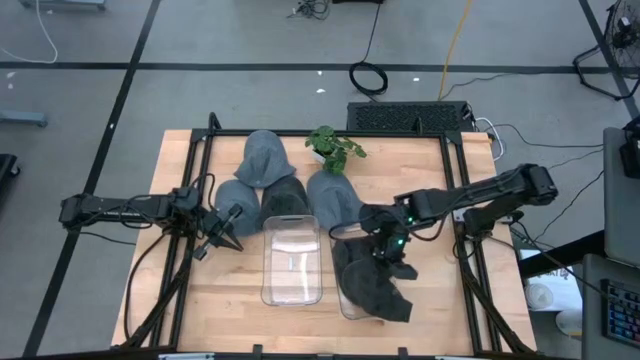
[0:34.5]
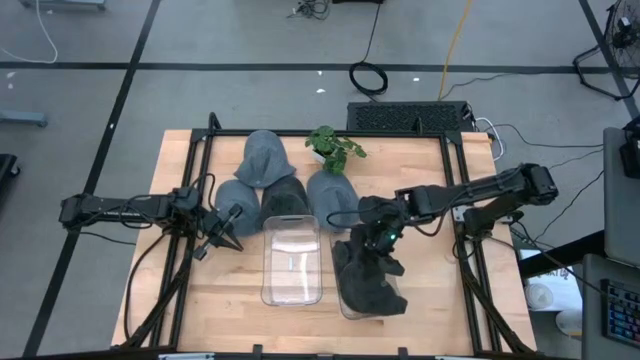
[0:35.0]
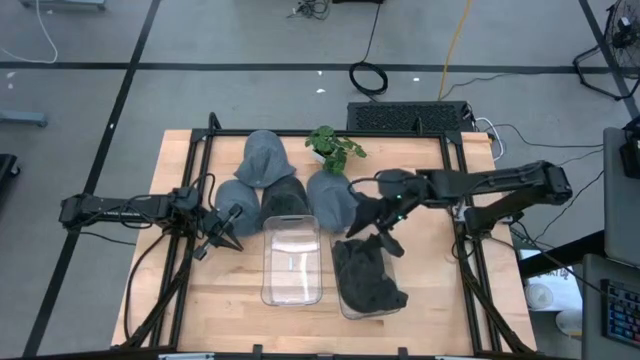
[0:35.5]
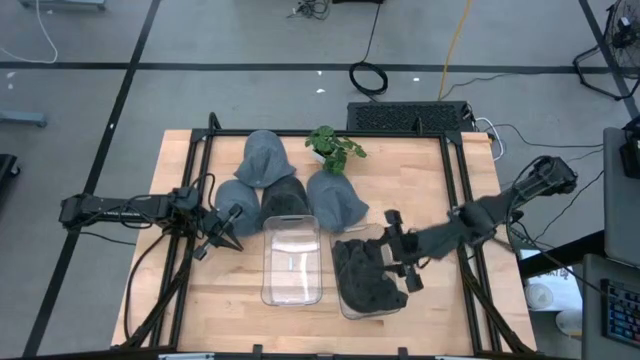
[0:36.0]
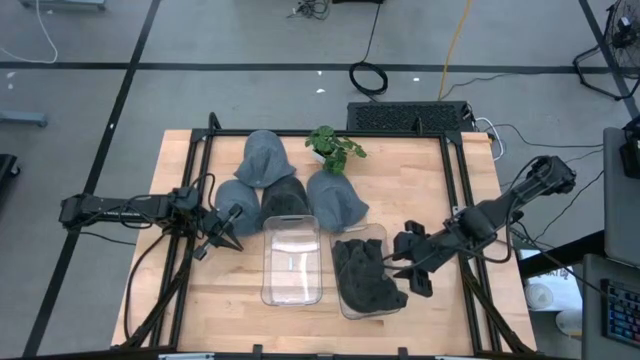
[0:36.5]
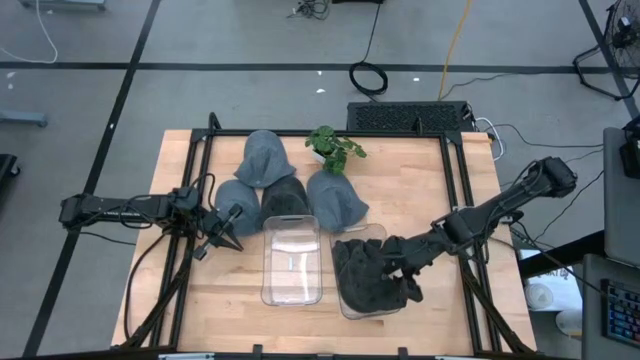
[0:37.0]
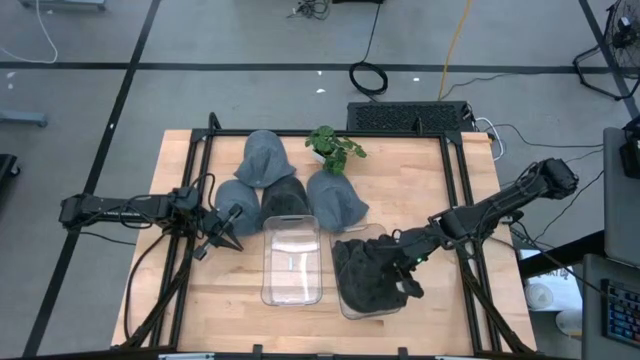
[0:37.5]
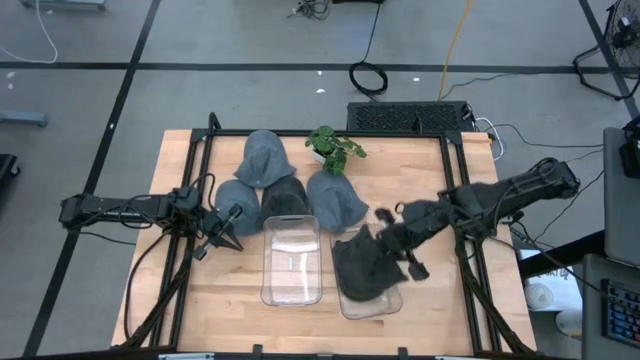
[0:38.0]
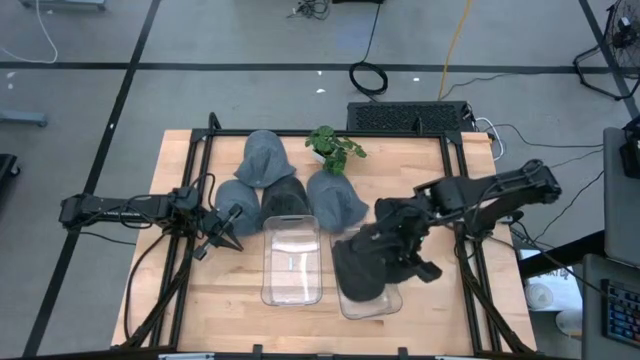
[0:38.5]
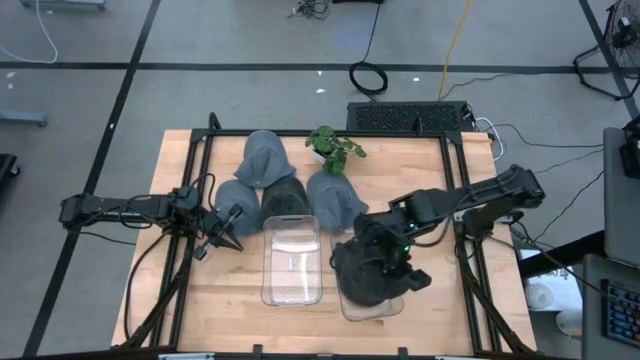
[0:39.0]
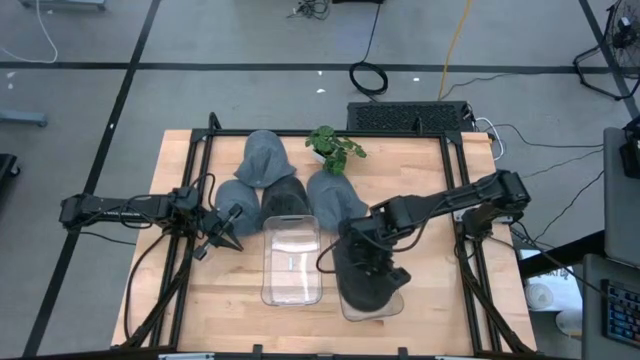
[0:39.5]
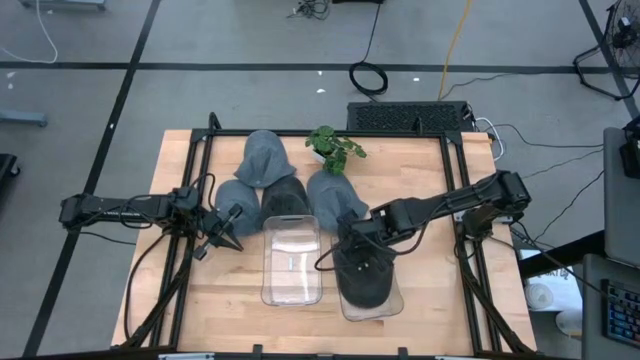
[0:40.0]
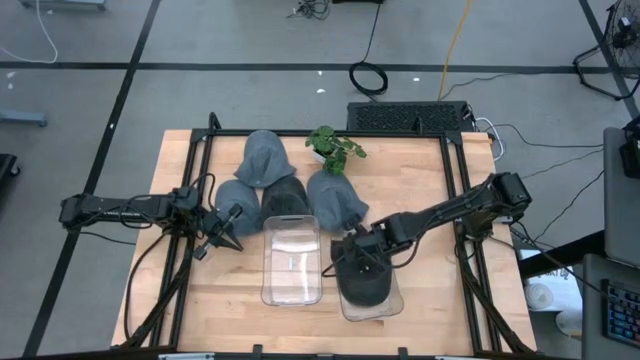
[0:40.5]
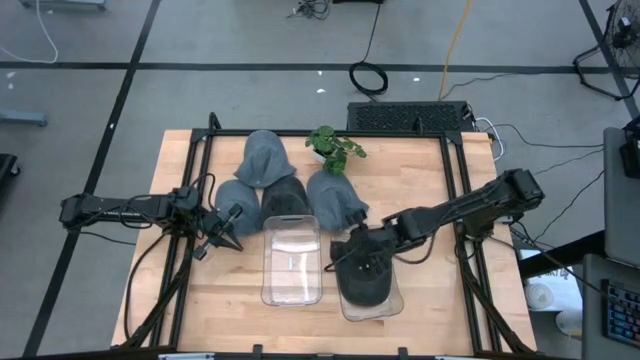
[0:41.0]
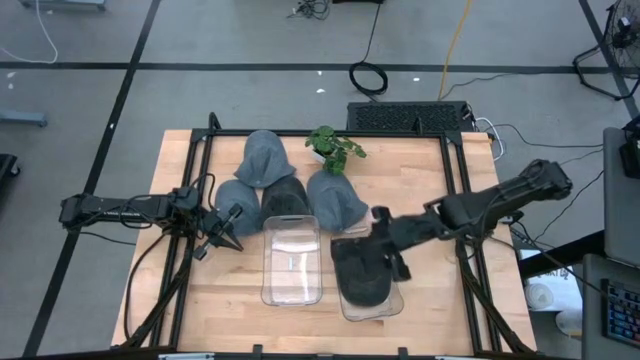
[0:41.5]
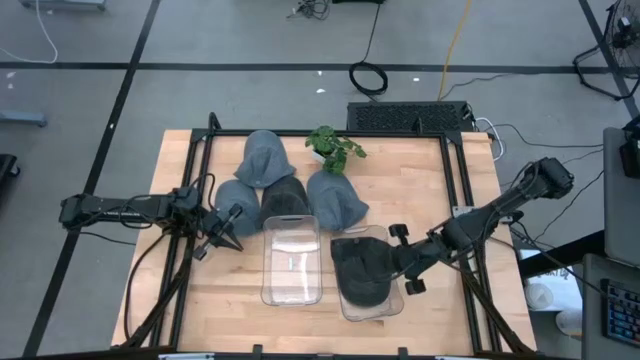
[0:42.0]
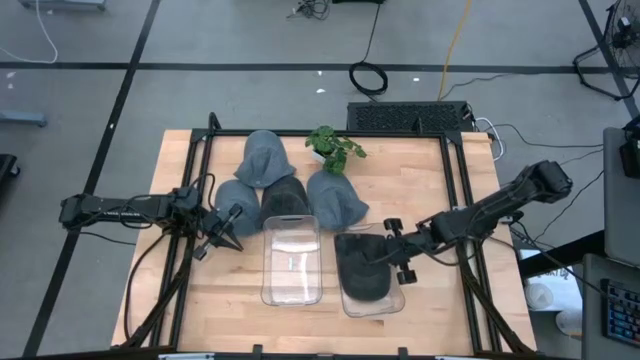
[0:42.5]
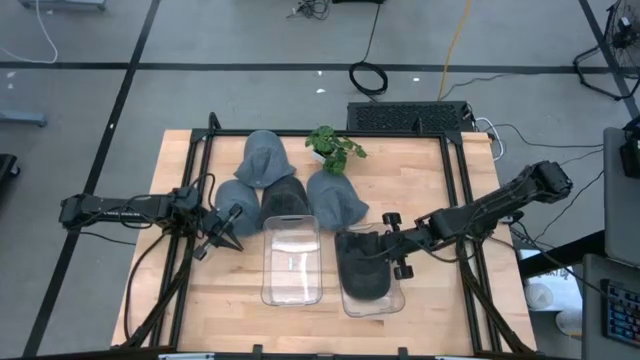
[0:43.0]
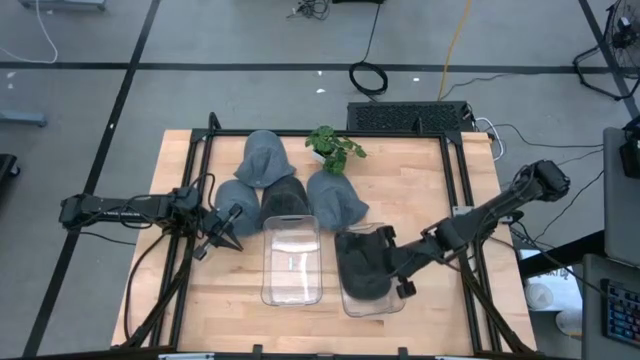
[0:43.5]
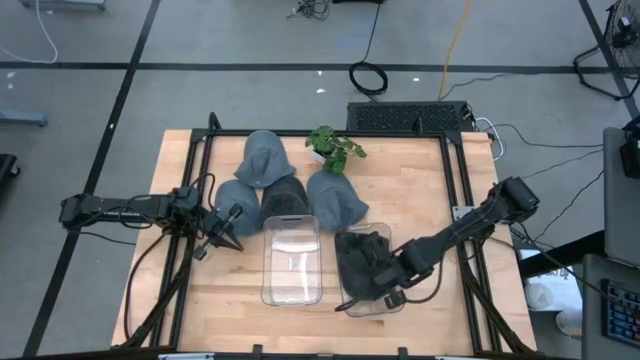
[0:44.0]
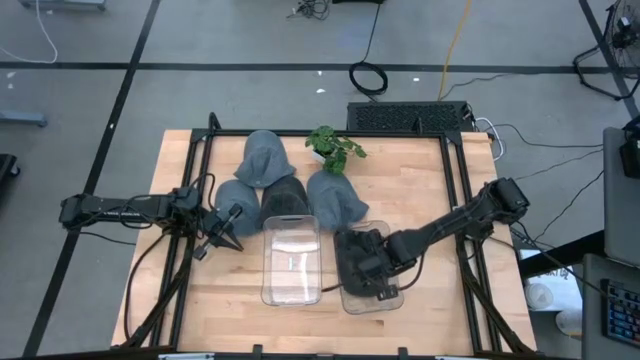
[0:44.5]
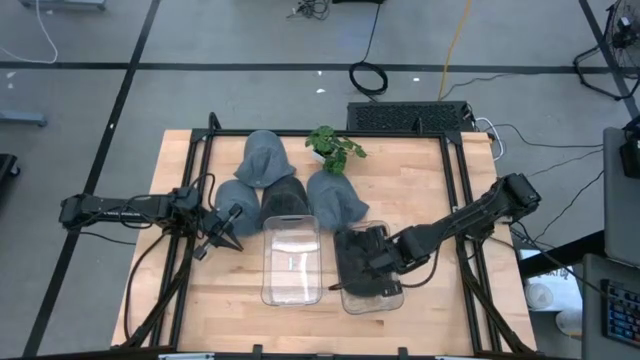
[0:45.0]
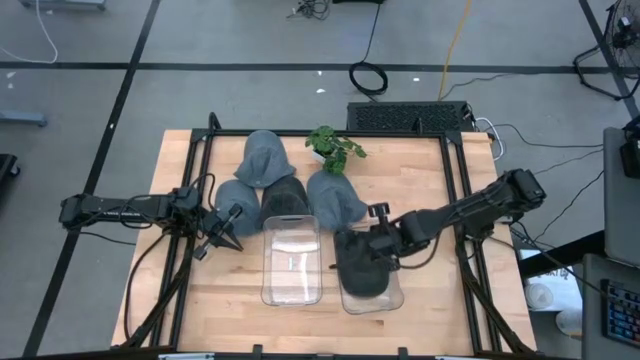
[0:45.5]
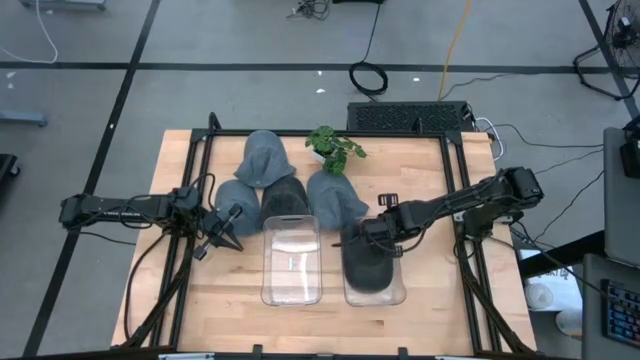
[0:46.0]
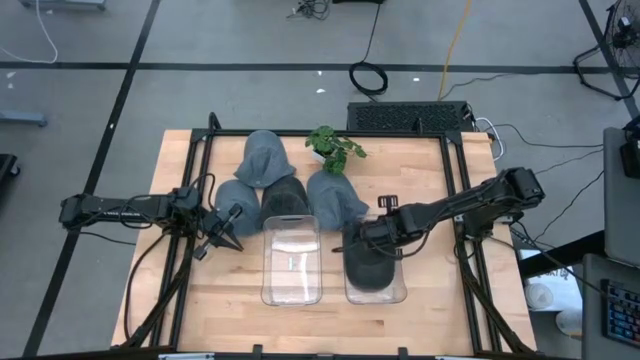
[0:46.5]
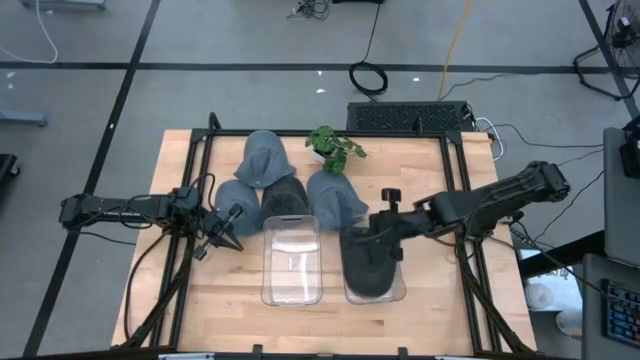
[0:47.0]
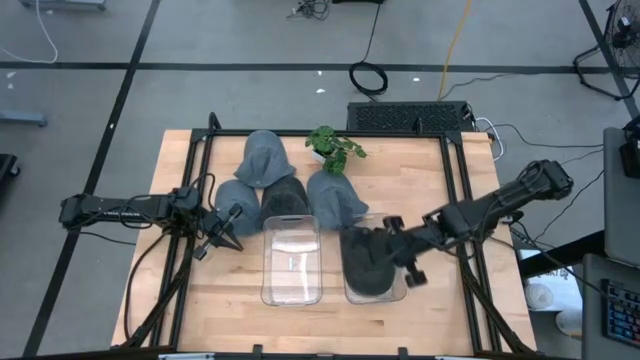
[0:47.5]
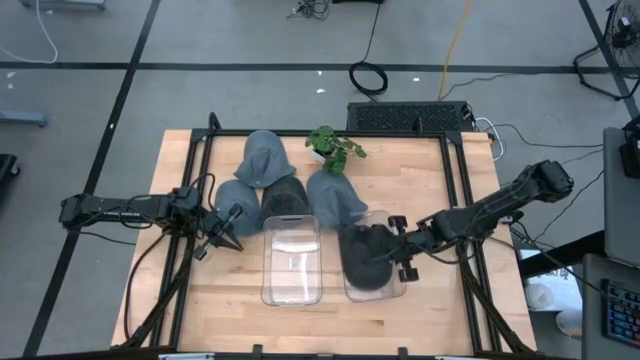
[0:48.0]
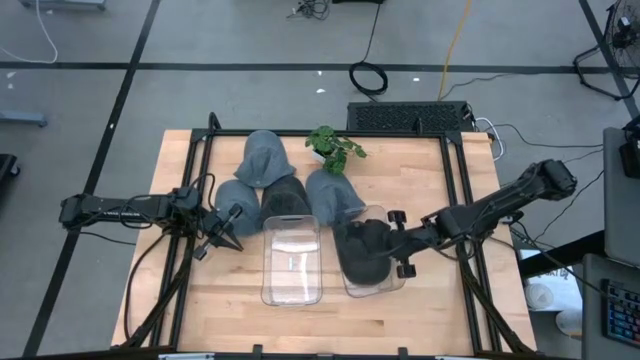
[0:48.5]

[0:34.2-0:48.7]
Task: Pick & Place hat
Put the right black cap into the right transparent bin

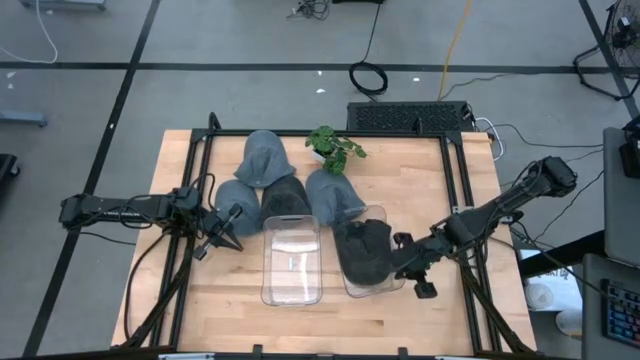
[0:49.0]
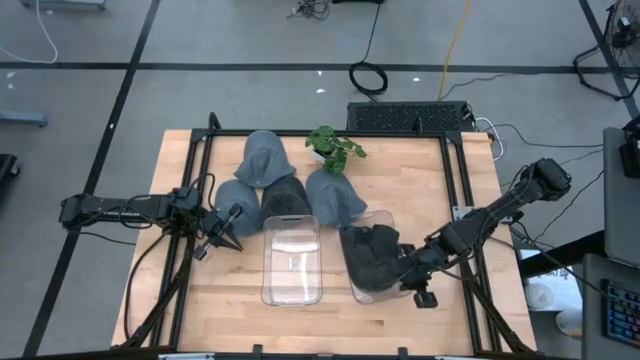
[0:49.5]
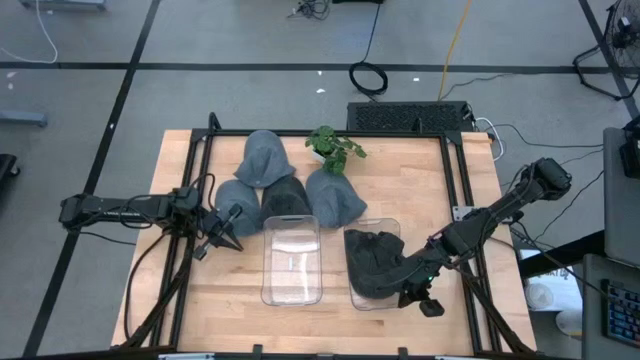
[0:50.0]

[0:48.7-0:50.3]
Adjust the right transparent bin on the table

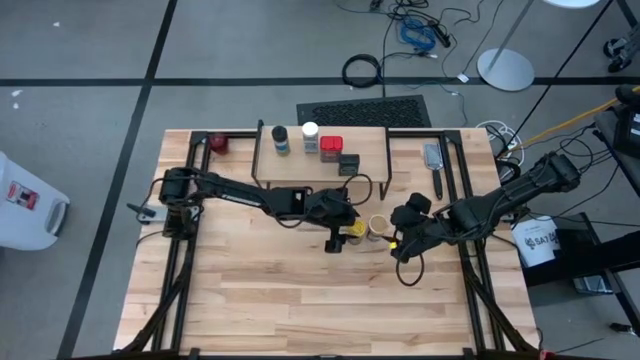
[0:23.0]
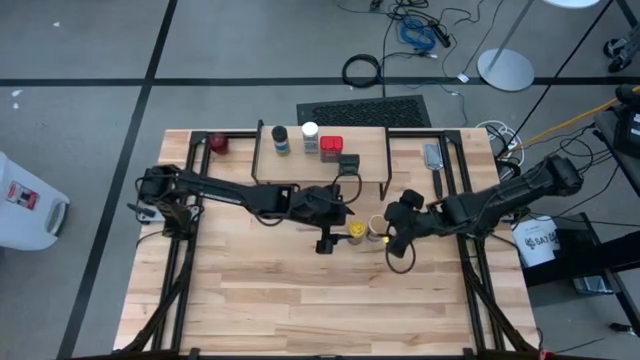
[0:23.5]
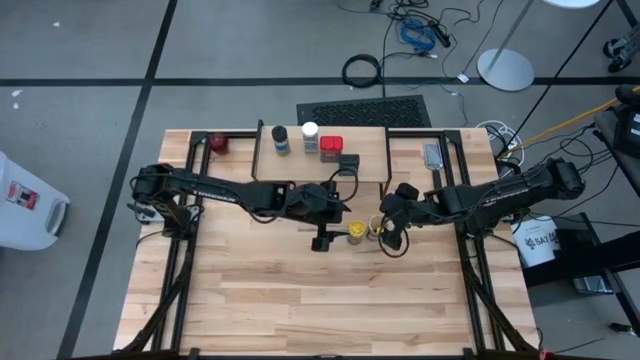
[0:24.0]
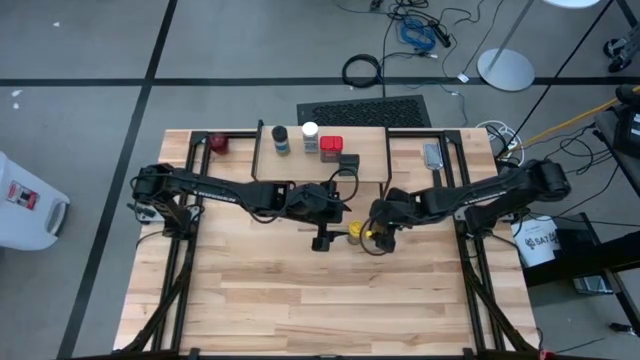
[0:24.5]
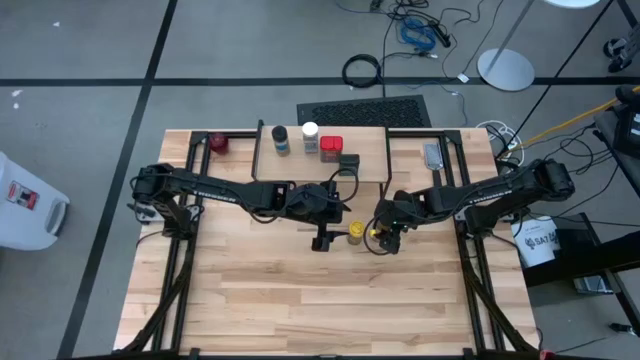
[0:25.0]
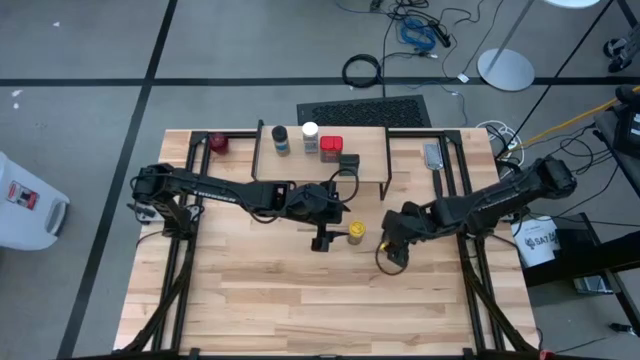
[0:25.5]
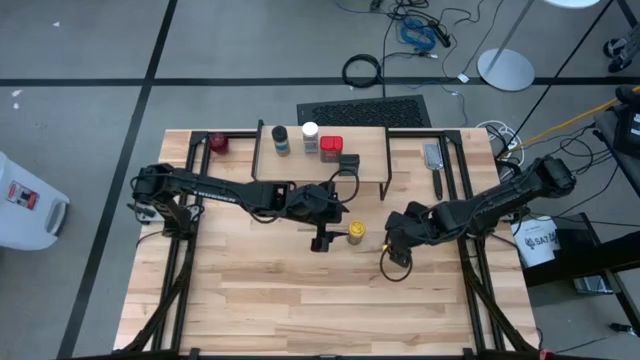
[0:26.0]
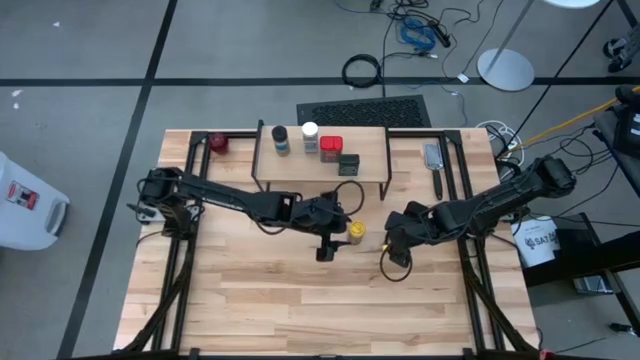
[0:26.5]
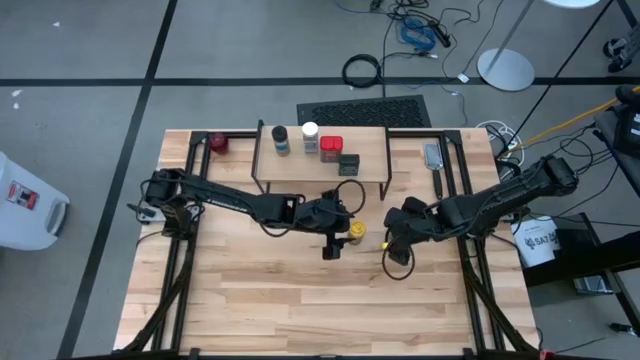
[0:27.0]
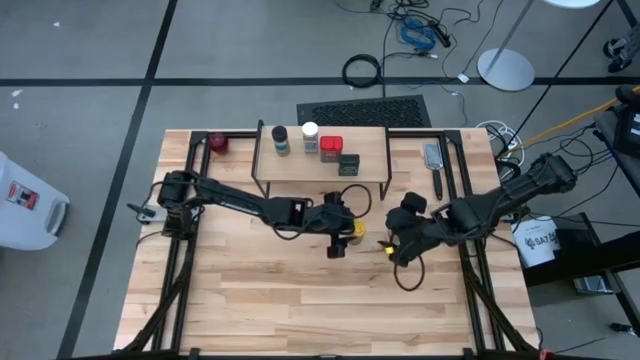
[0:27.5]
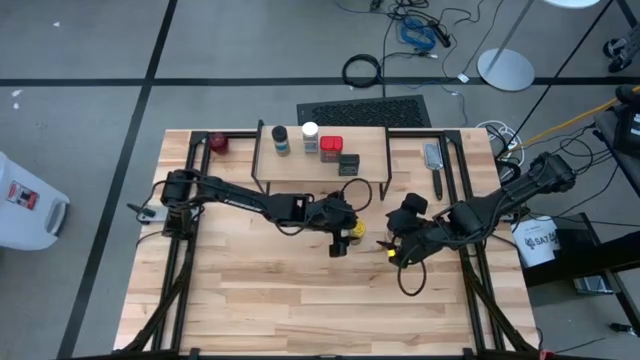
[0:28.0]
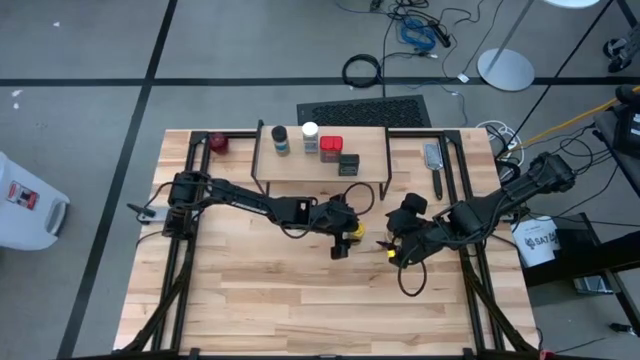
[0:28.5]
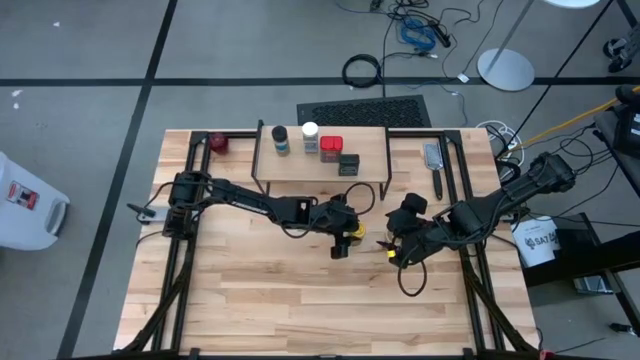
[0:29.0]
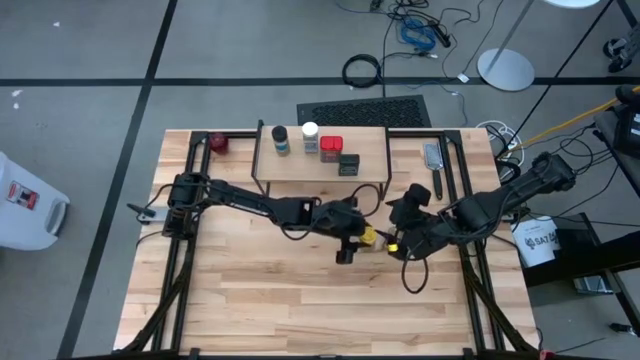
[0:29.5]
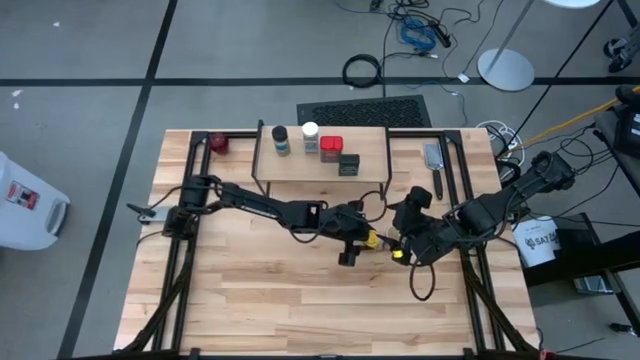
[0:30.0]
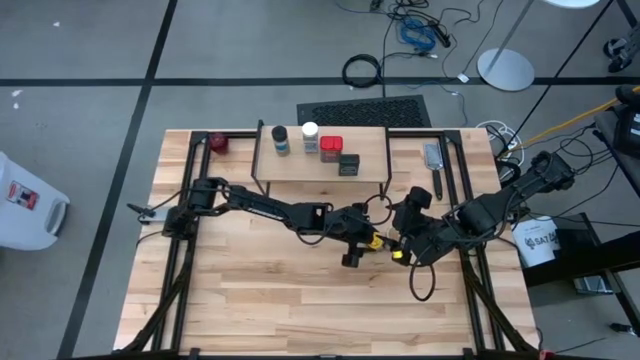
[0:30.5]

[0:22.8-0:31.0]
Task: Shelf spices
Adjust the seasoning bottles on the table
